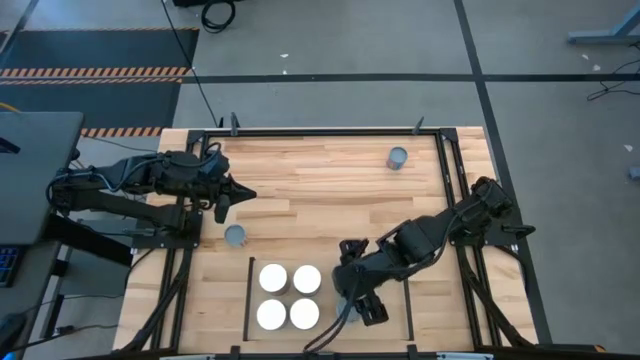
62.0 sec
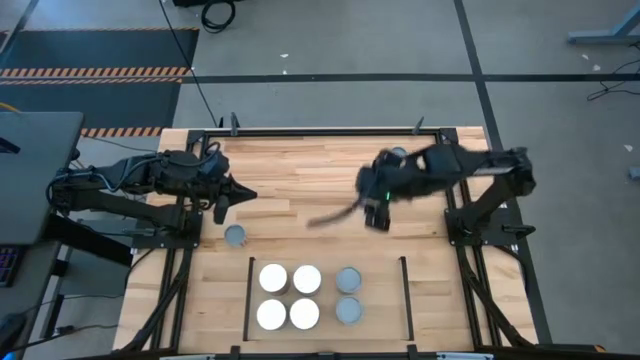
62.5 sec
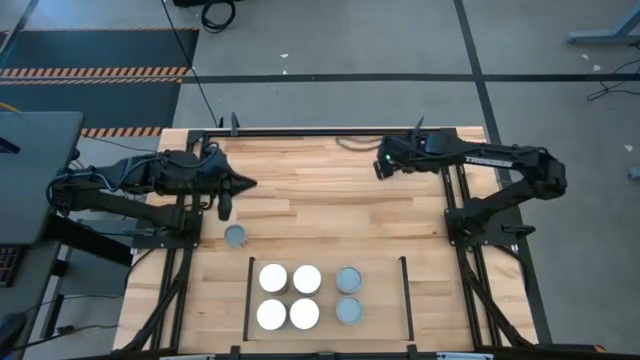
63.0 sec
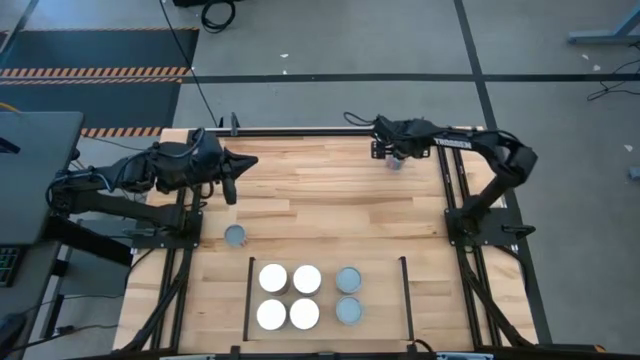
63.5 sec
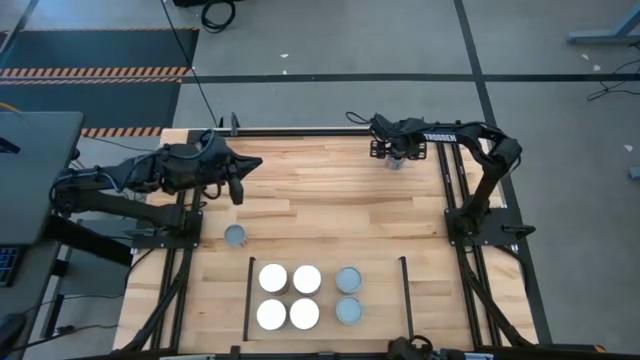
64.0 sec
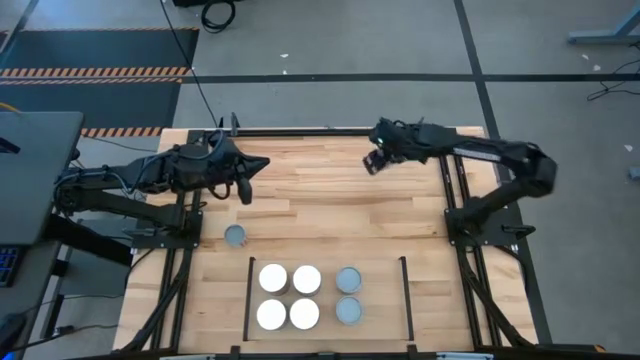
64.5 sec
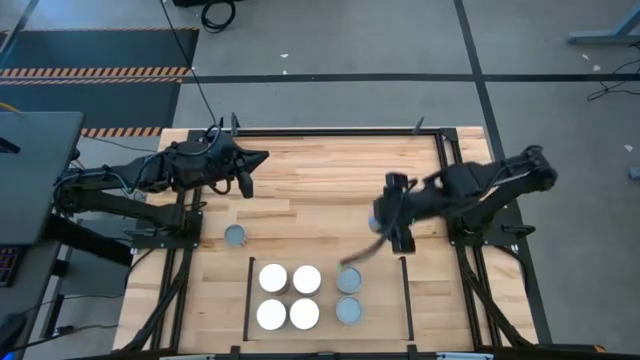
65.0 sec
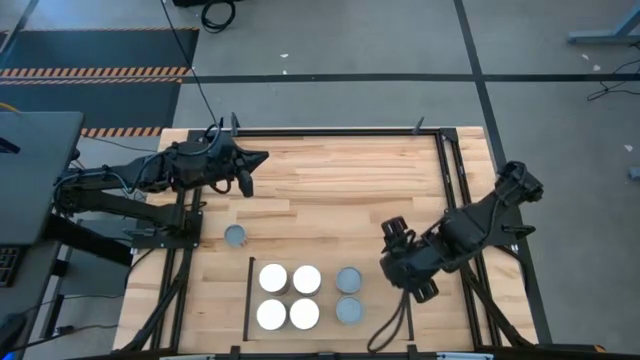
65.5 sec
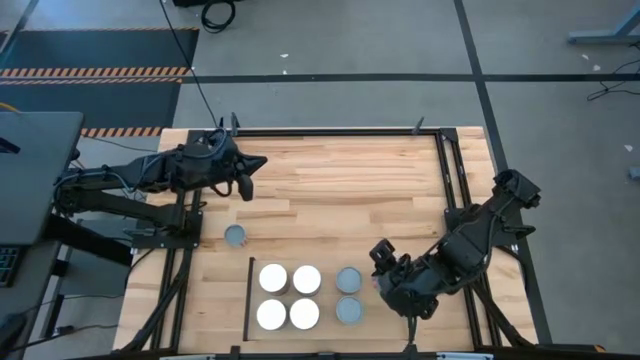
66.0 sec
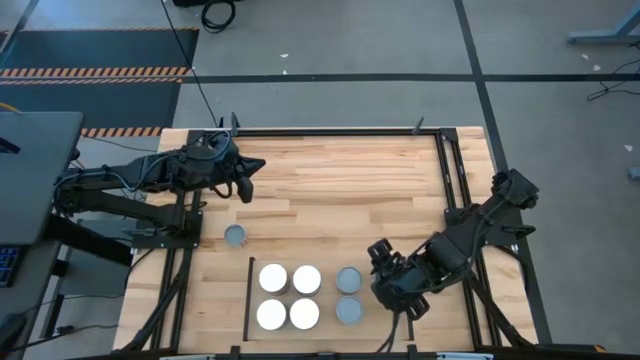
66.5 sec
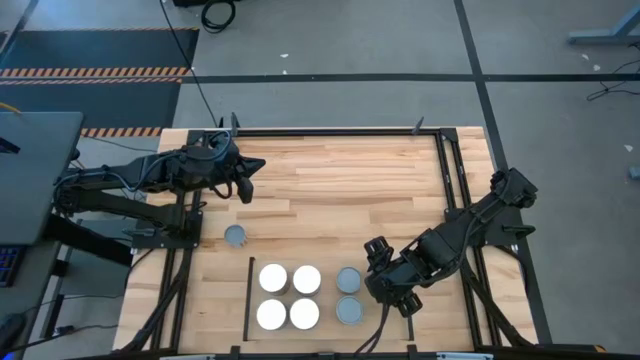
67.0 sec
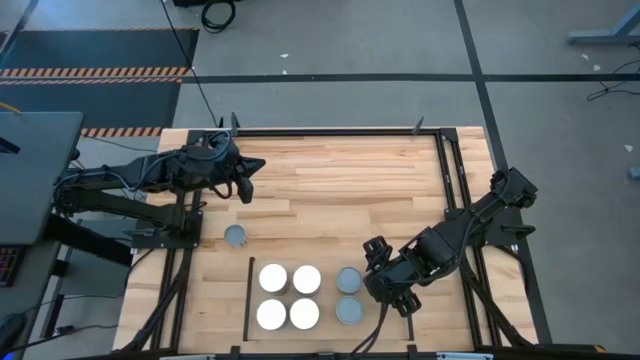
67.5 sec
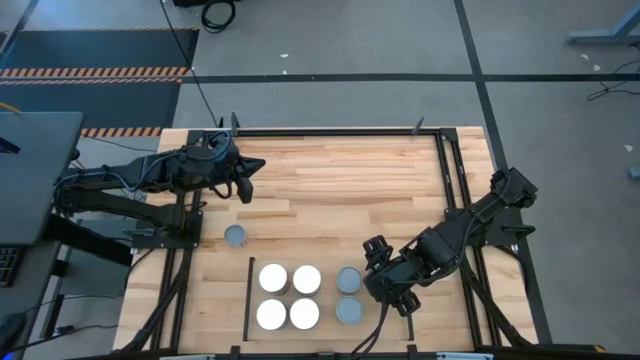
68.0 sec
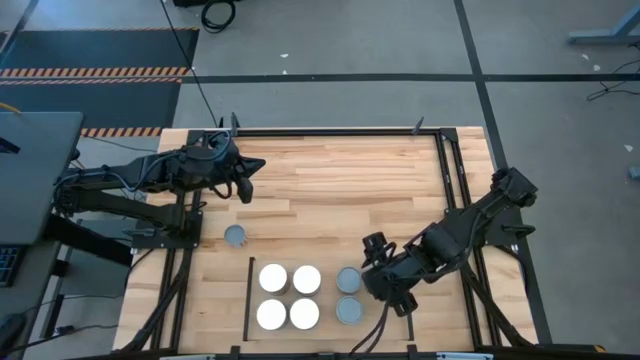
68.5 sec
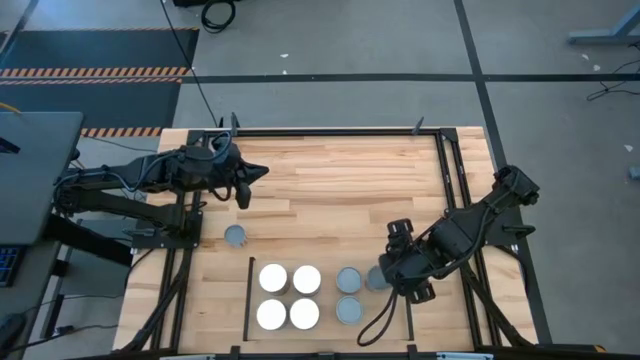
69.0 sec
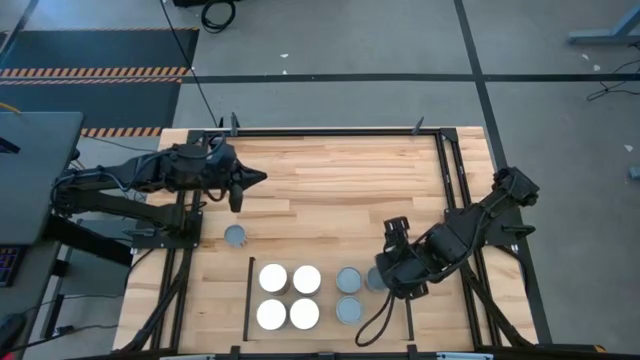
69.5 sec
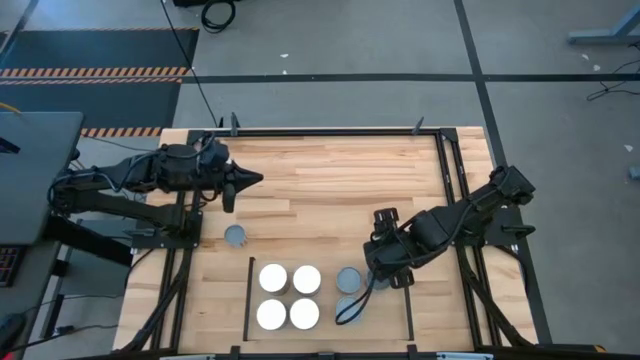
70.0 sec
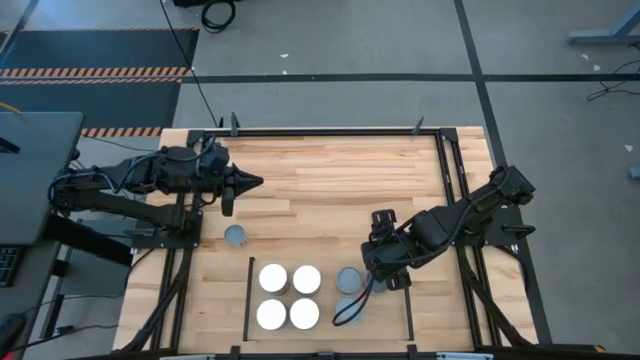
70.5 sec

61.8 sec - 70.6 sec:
Task: Pick and place cans onto a shelf
Put the small canned corn on the shelf

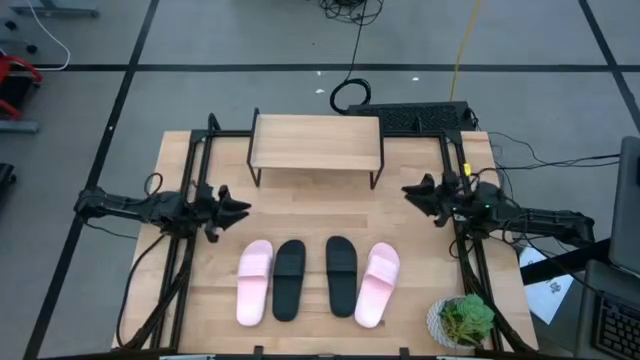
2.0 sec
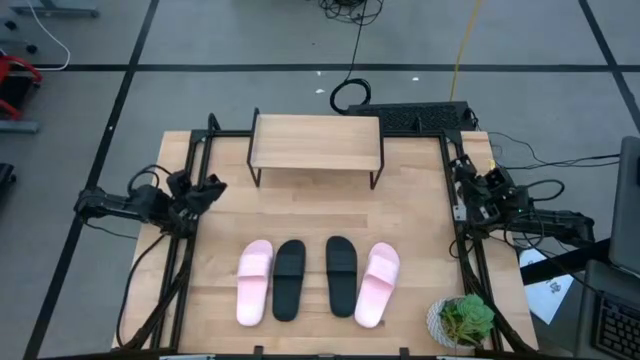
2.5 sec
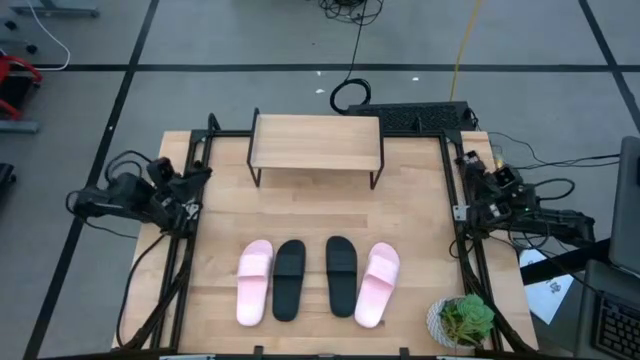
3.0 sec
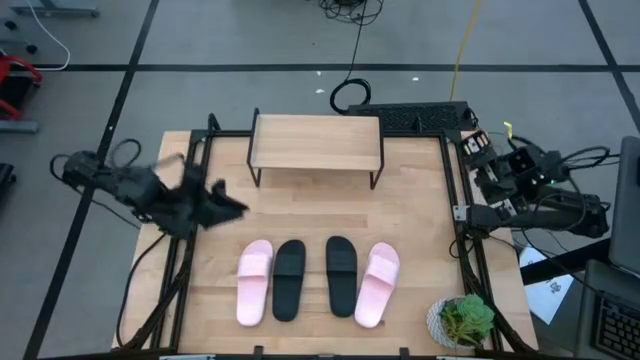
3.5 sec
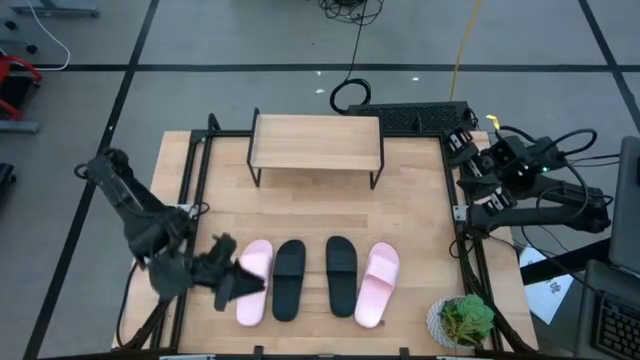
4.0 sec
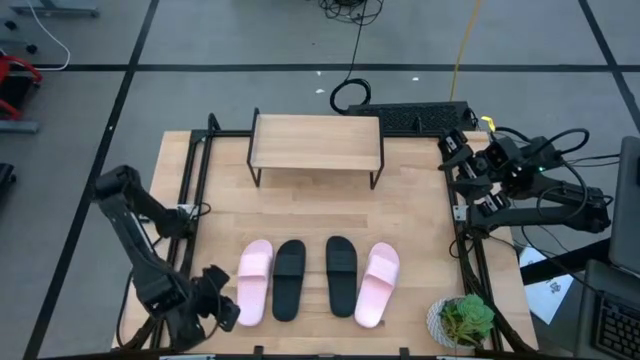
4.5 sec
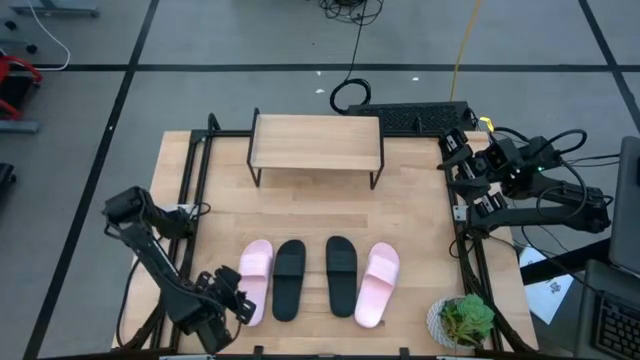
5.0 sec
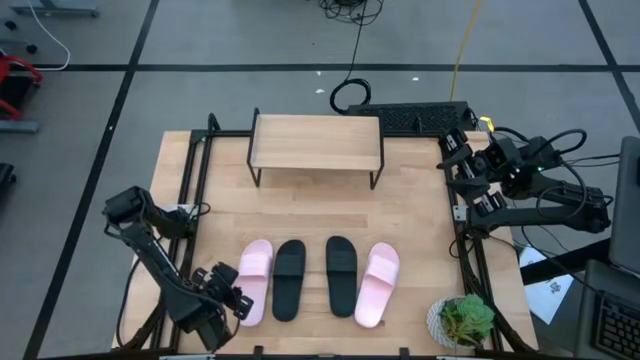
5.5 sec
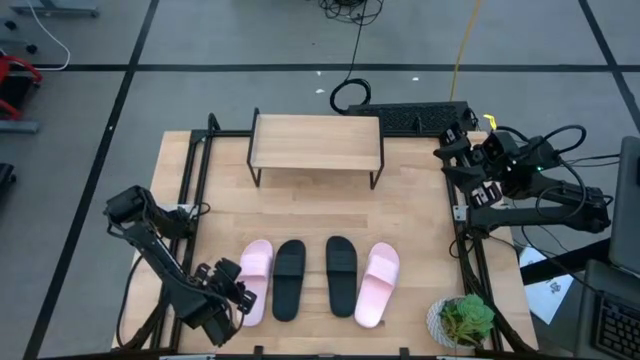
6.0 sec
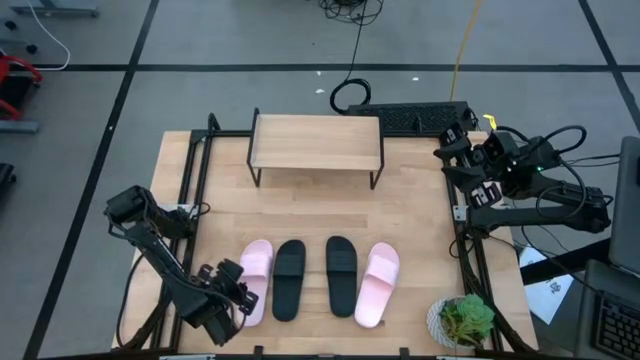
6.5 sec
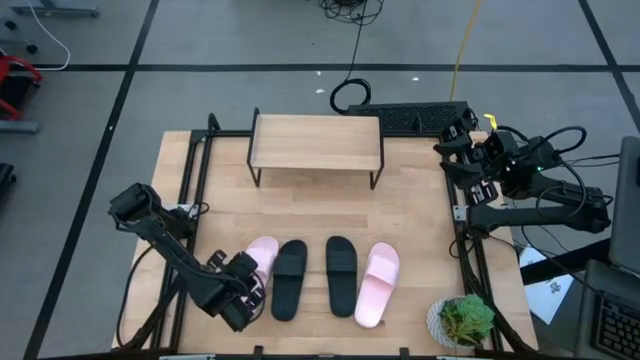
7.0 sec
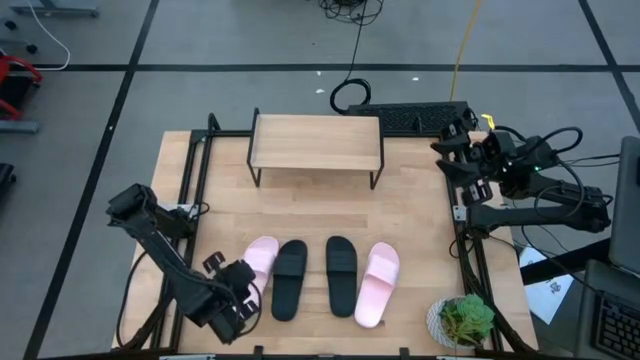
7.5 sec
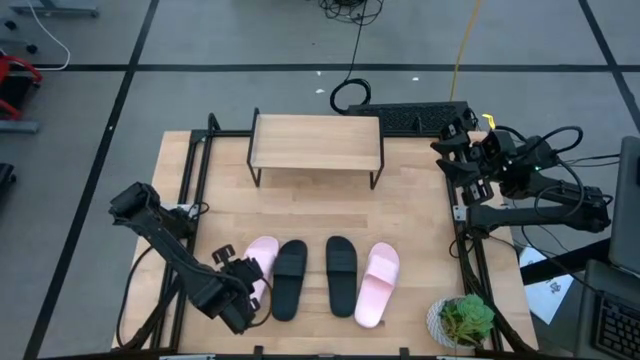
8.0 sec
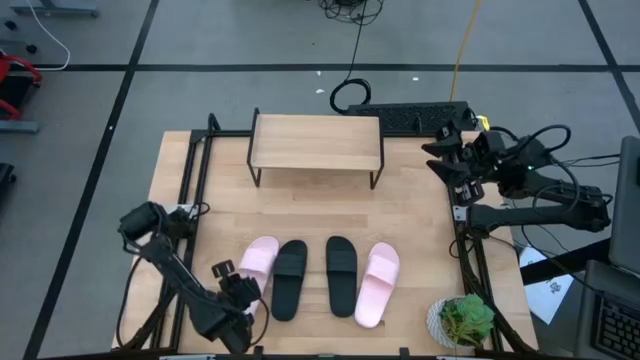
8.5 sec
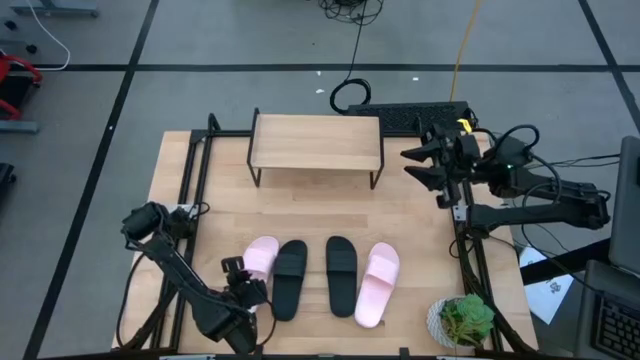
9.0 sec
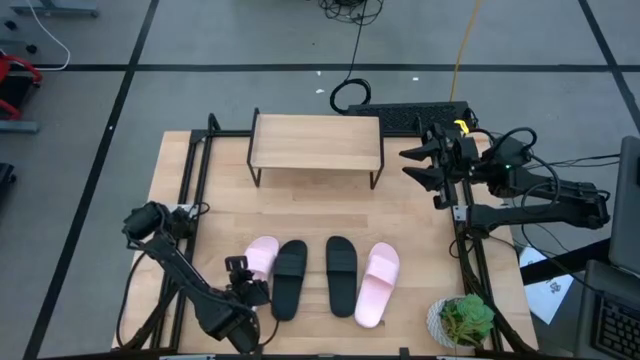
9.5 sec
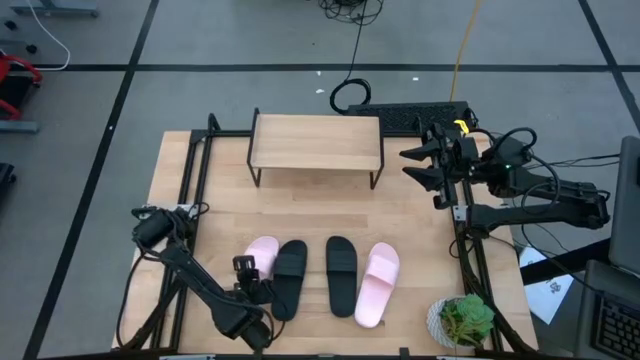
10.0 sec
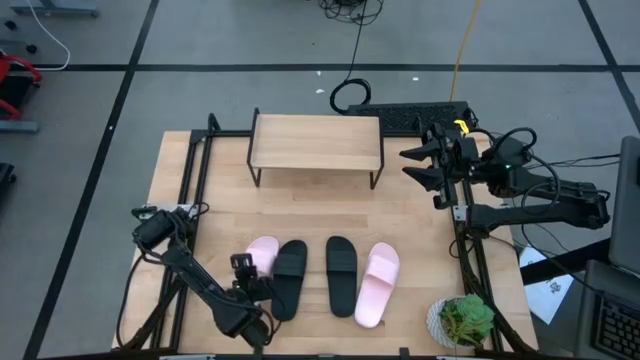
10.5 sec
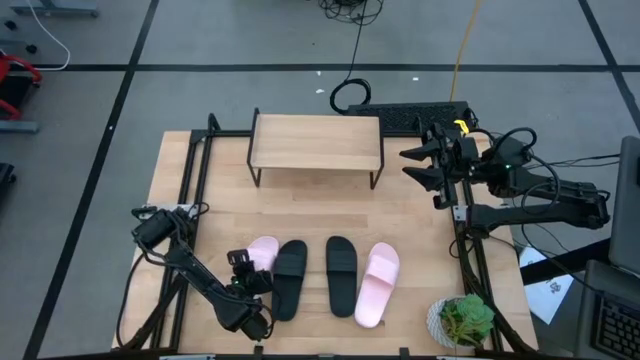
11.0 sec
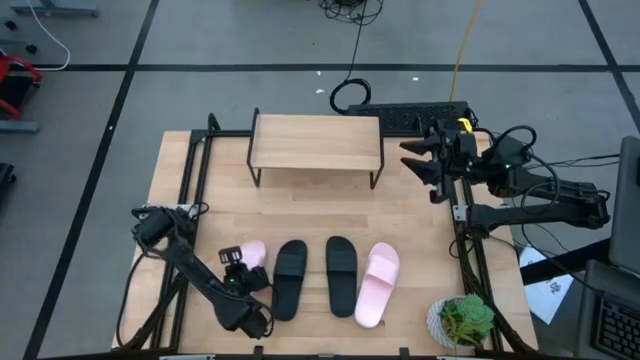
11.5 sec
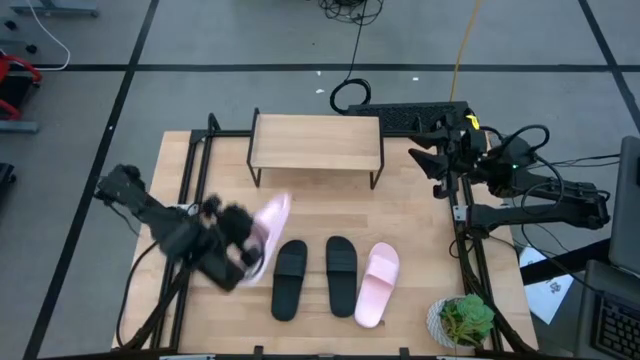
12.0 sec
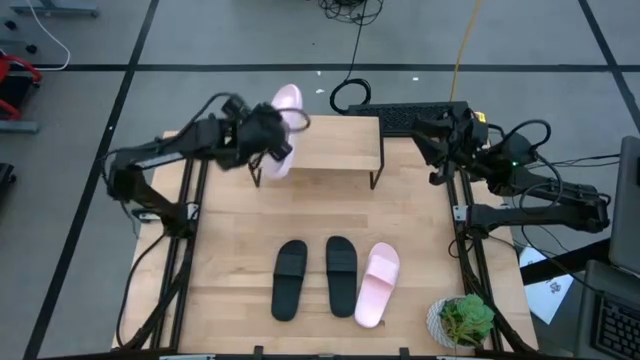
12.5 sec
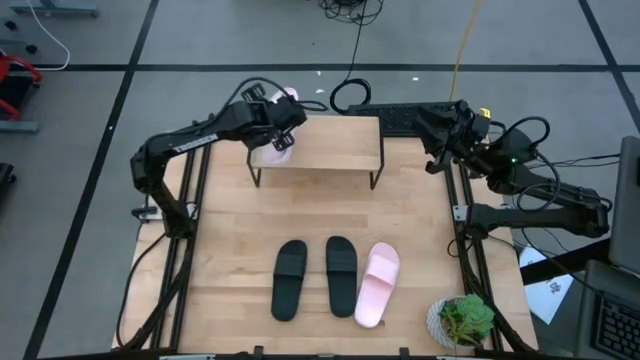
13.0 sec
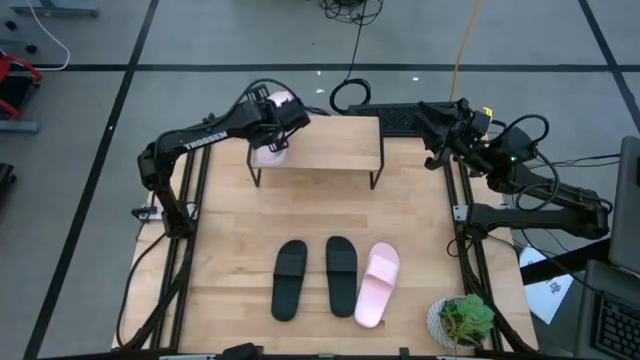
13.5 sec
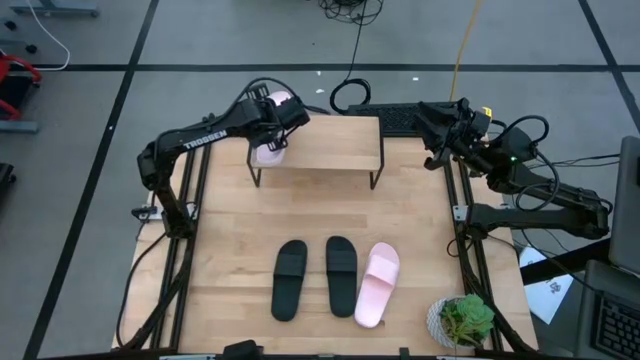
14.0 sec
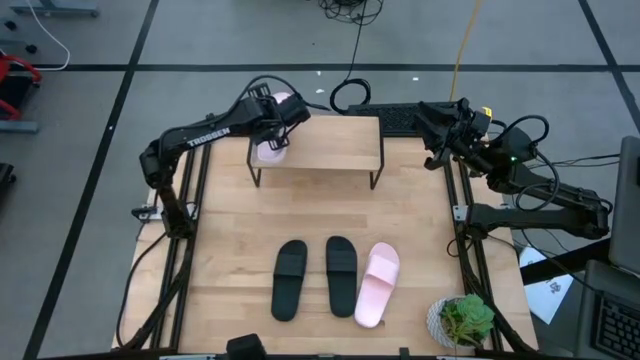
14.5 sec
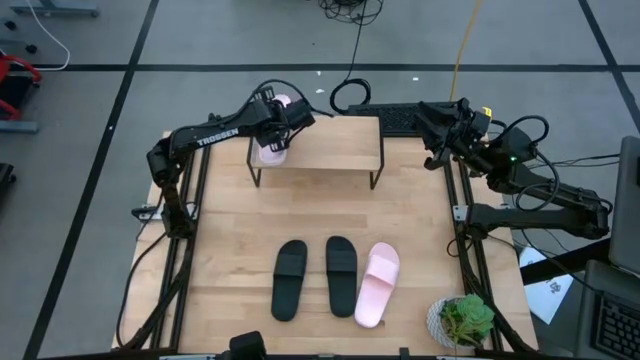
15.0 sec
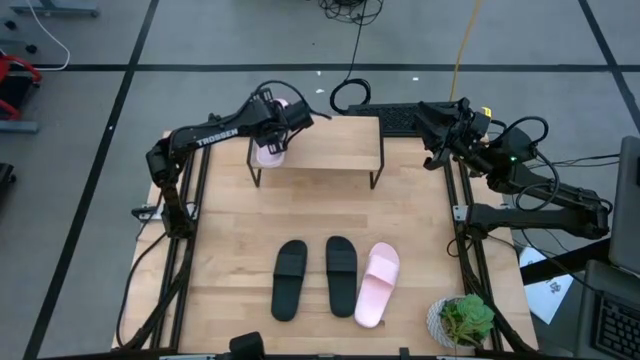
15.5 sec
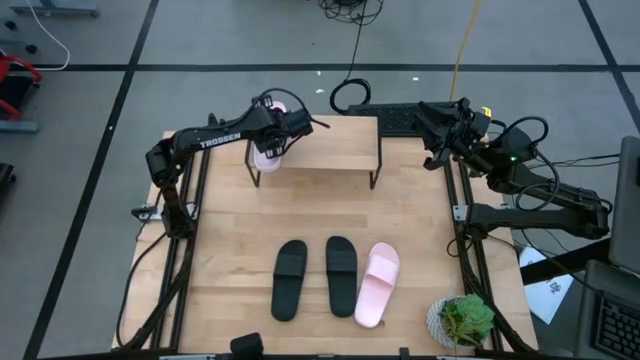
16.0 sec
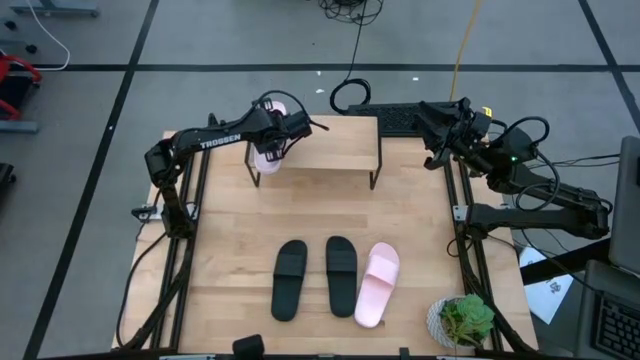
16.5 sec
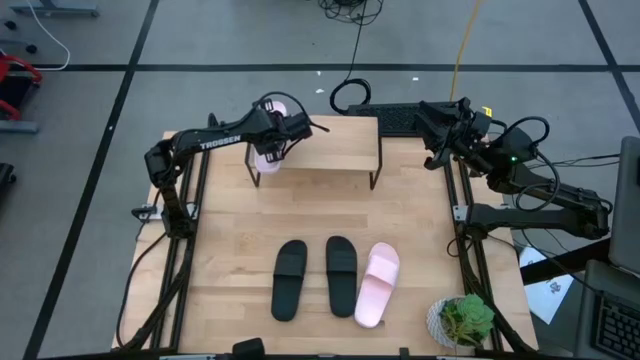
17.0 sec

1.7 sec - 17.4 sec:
Task: Pick and place slides into the shelf
Put the left pink slide on the shelf
